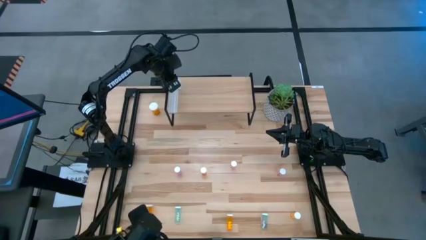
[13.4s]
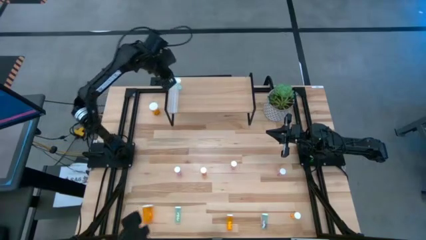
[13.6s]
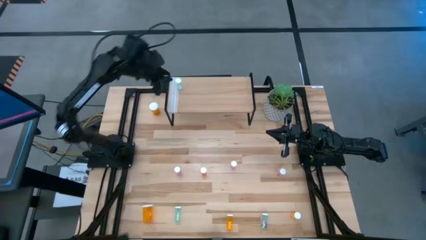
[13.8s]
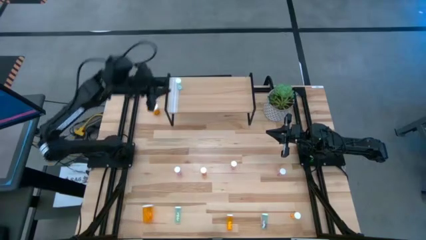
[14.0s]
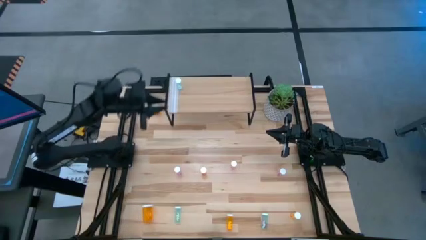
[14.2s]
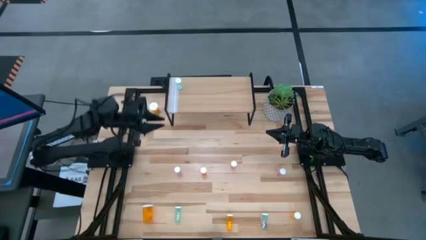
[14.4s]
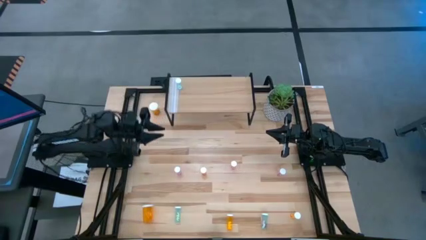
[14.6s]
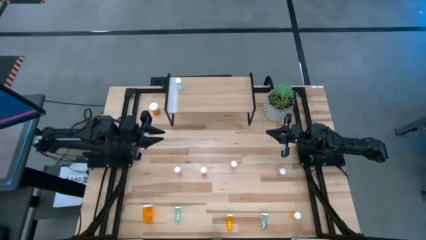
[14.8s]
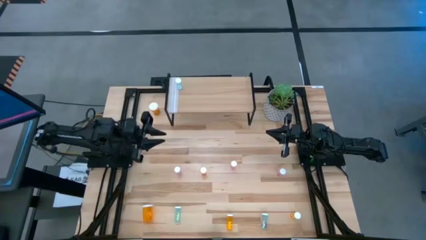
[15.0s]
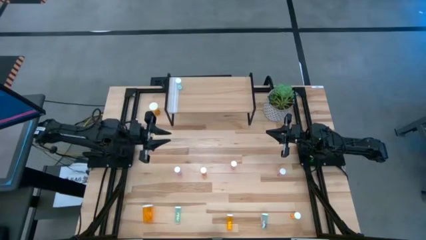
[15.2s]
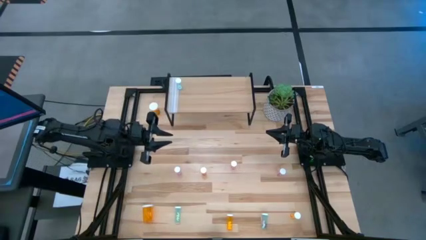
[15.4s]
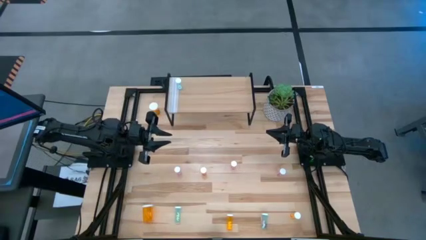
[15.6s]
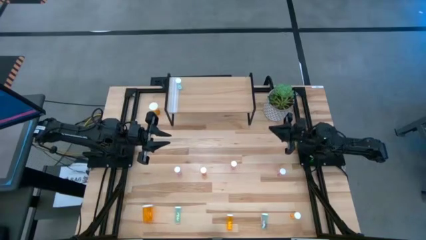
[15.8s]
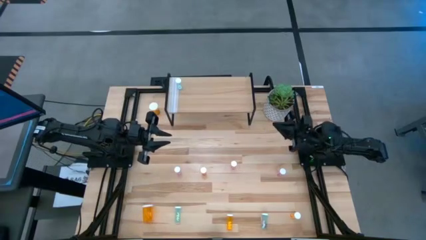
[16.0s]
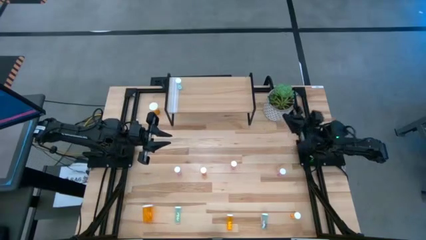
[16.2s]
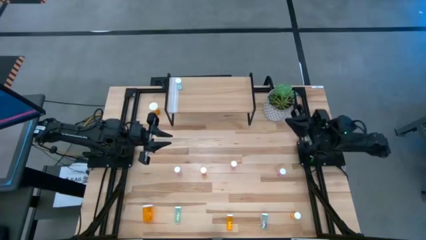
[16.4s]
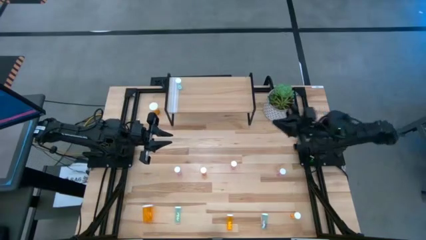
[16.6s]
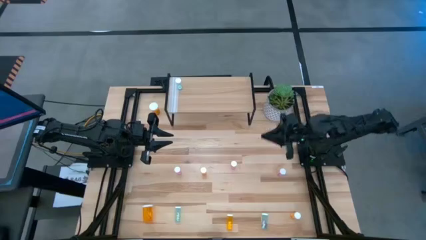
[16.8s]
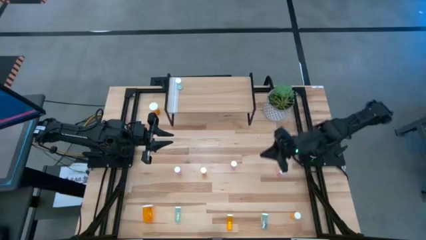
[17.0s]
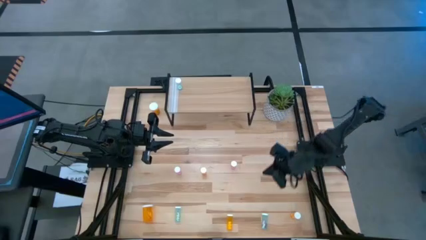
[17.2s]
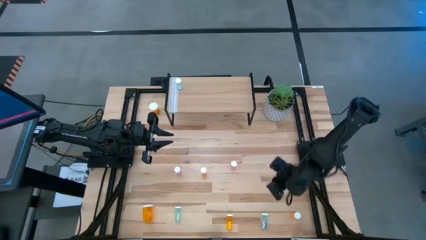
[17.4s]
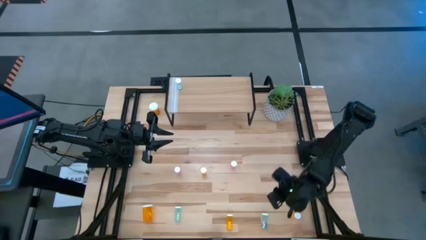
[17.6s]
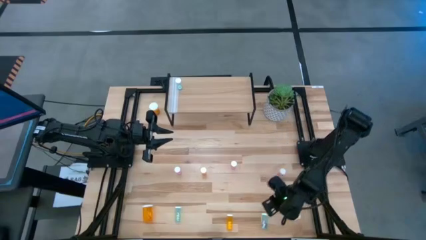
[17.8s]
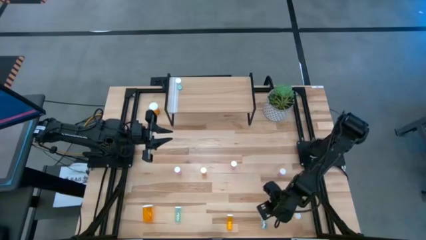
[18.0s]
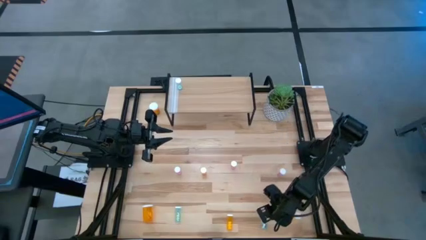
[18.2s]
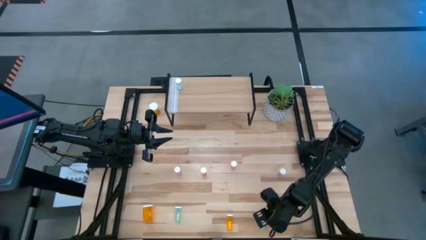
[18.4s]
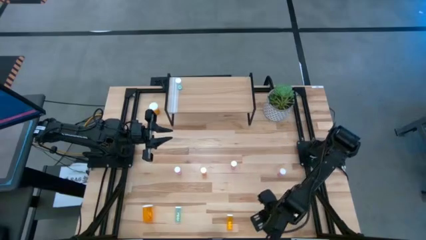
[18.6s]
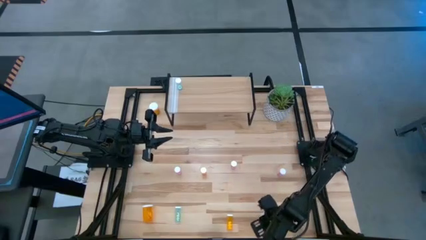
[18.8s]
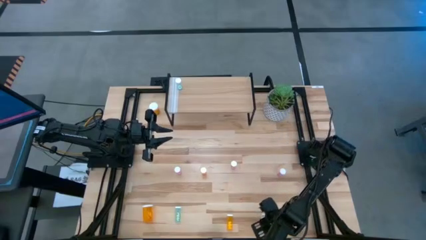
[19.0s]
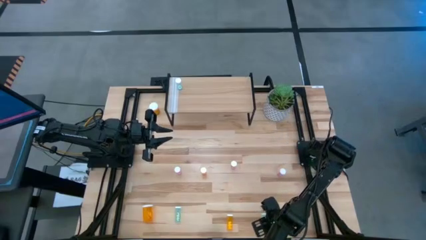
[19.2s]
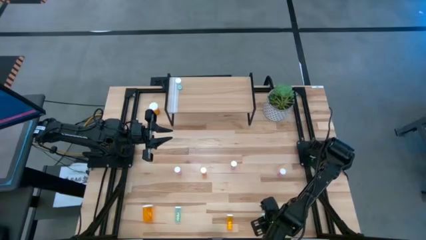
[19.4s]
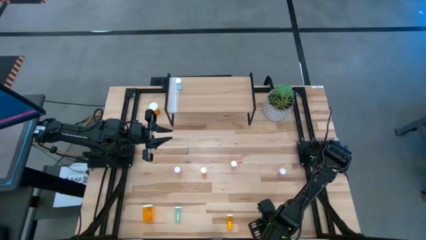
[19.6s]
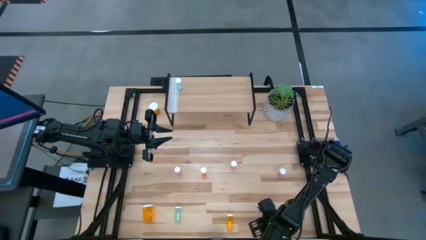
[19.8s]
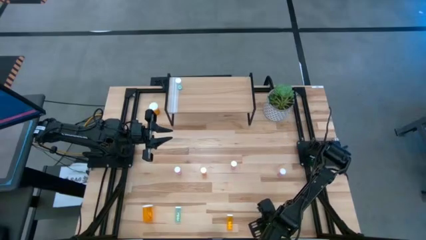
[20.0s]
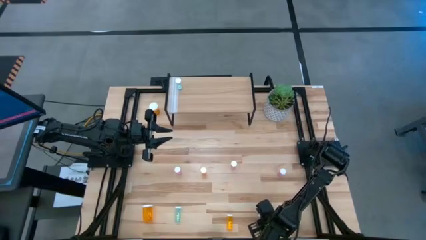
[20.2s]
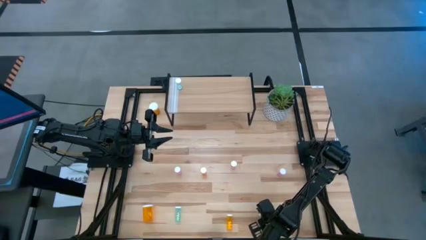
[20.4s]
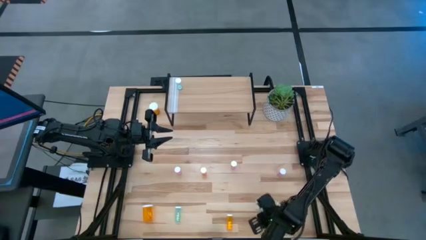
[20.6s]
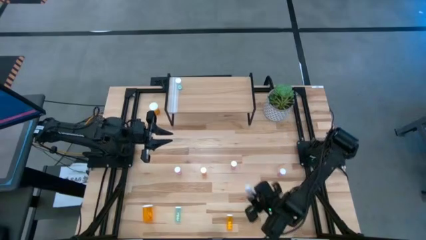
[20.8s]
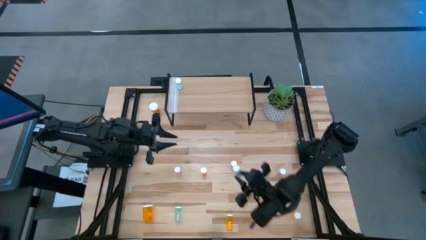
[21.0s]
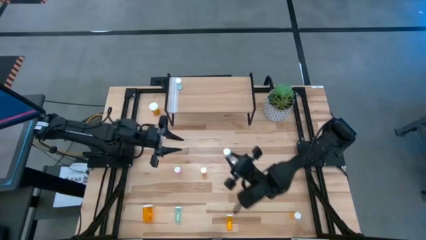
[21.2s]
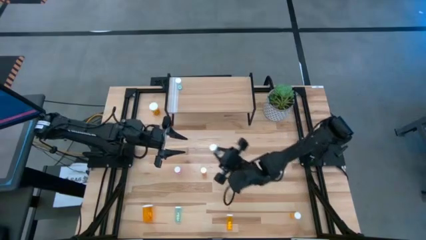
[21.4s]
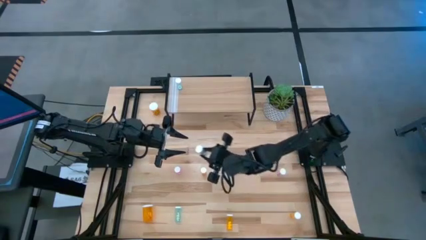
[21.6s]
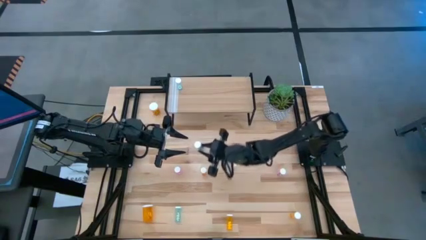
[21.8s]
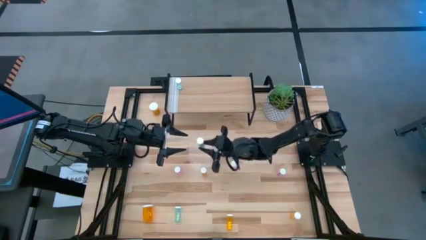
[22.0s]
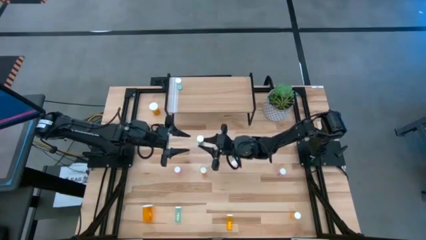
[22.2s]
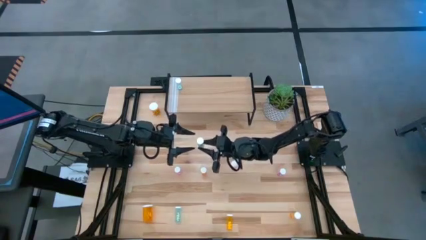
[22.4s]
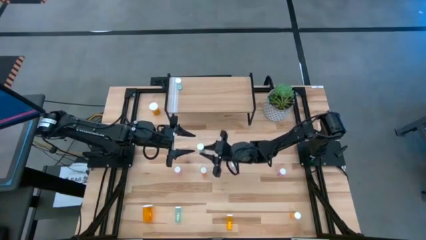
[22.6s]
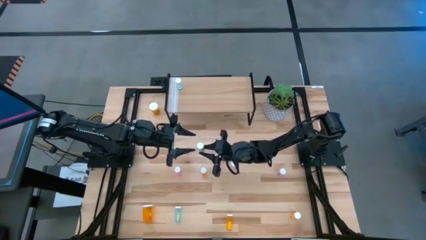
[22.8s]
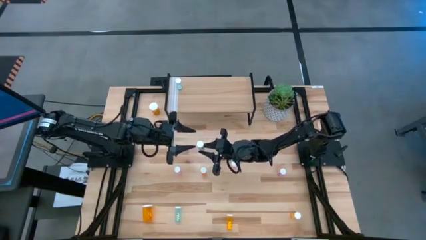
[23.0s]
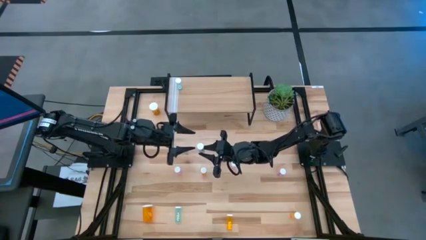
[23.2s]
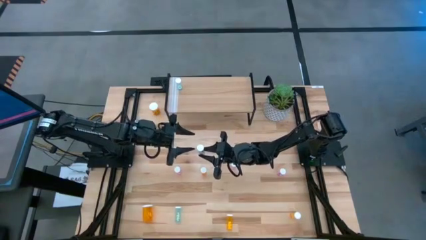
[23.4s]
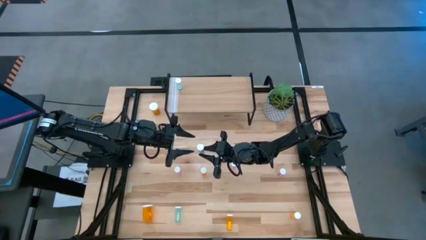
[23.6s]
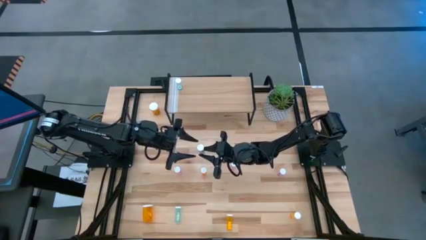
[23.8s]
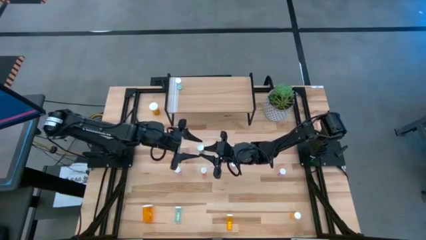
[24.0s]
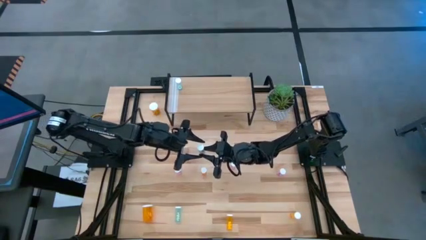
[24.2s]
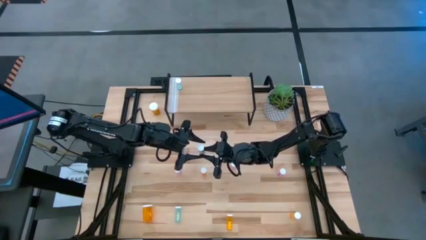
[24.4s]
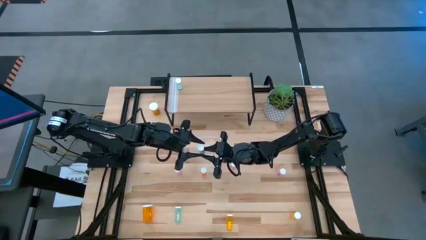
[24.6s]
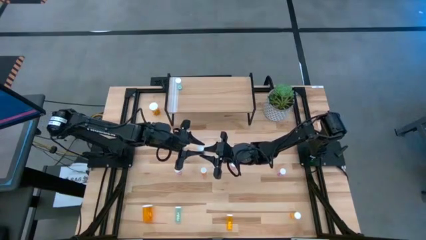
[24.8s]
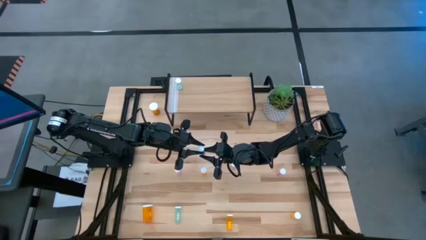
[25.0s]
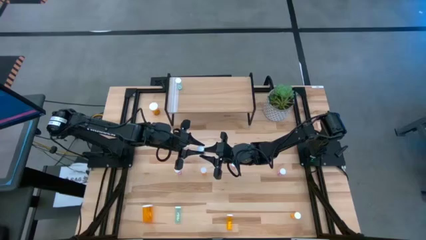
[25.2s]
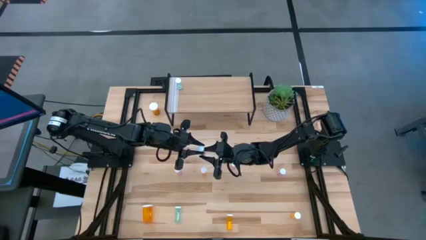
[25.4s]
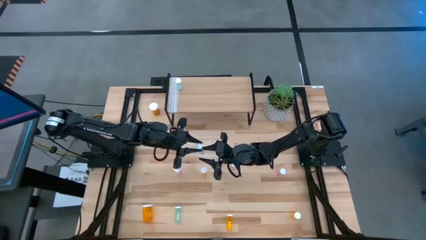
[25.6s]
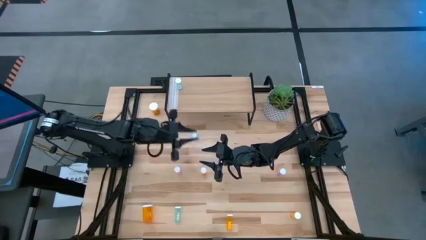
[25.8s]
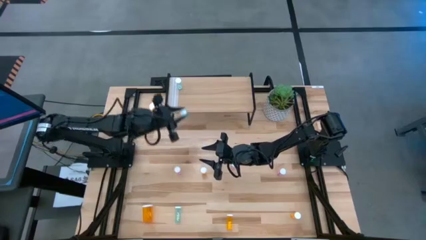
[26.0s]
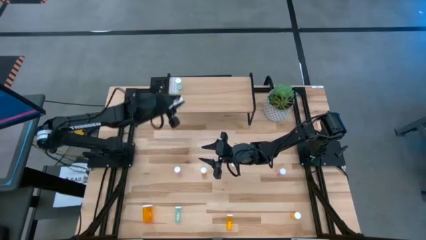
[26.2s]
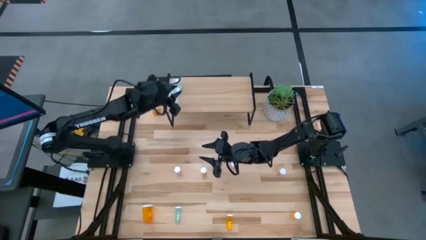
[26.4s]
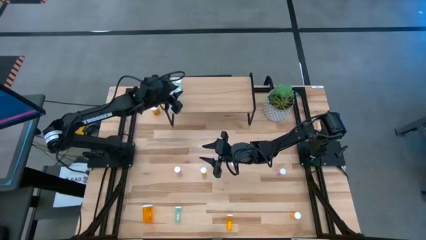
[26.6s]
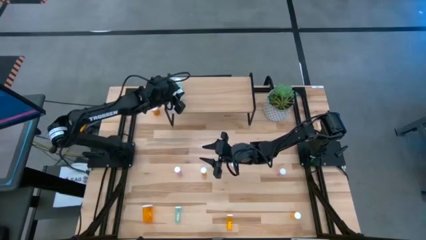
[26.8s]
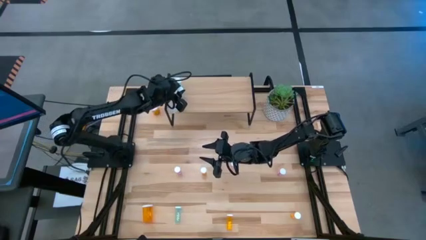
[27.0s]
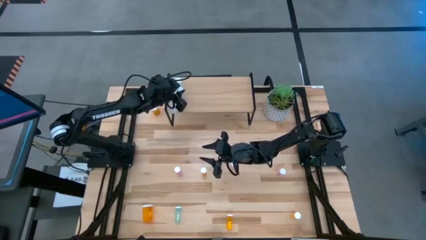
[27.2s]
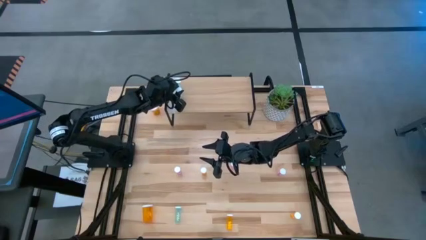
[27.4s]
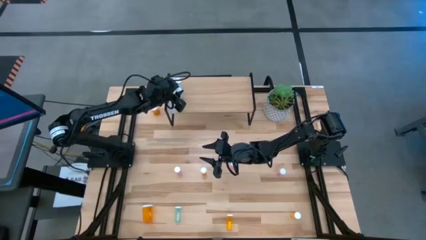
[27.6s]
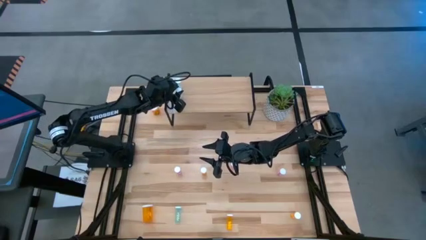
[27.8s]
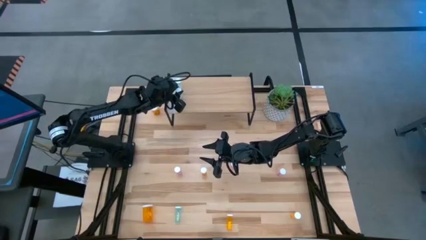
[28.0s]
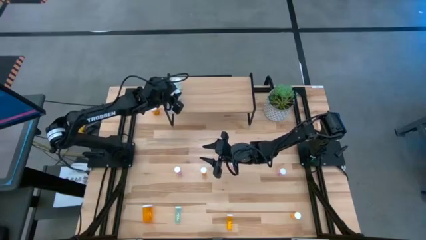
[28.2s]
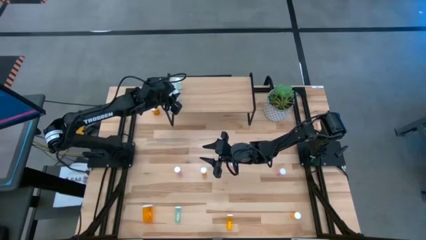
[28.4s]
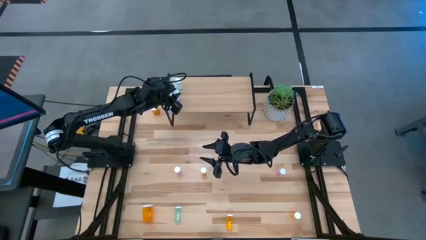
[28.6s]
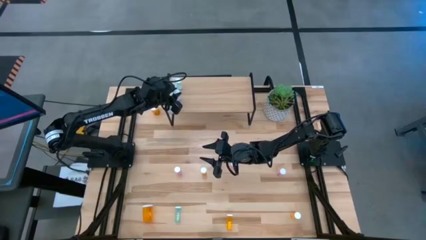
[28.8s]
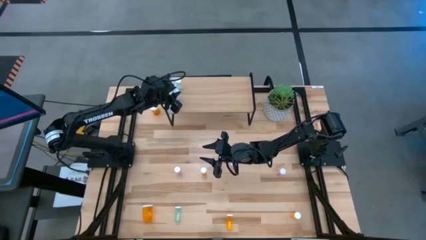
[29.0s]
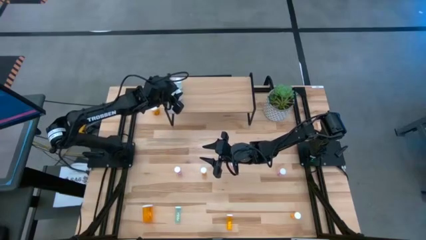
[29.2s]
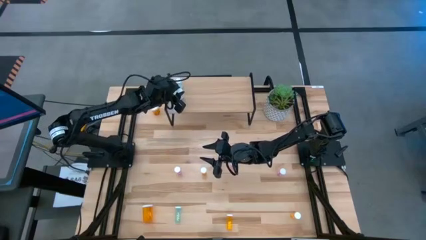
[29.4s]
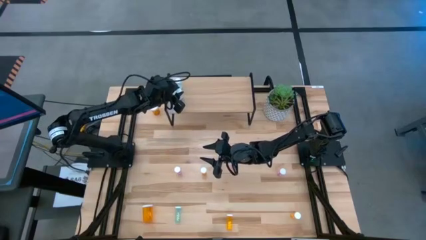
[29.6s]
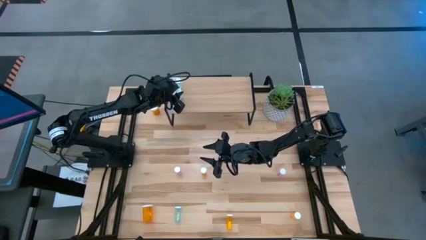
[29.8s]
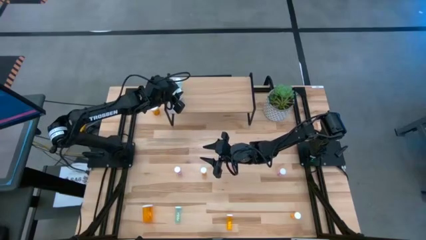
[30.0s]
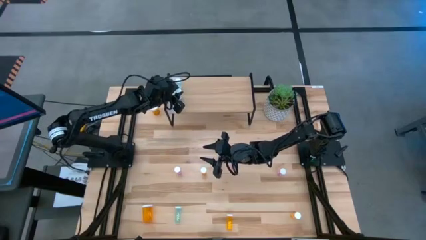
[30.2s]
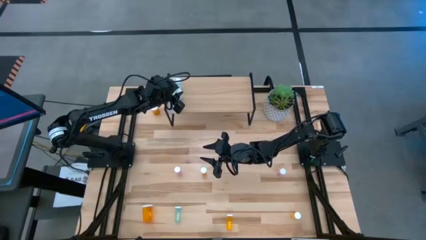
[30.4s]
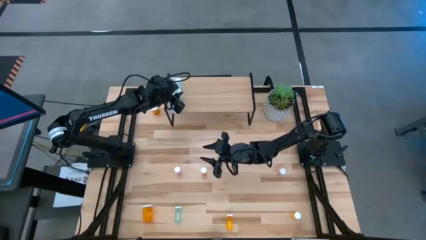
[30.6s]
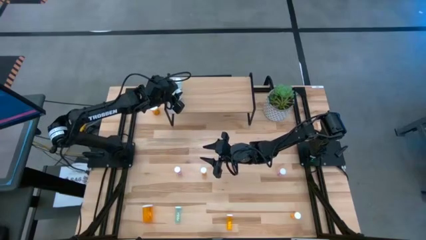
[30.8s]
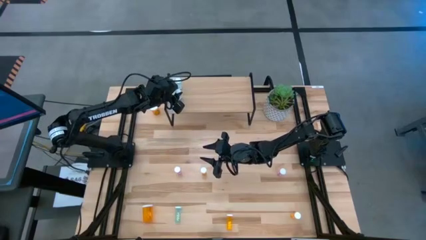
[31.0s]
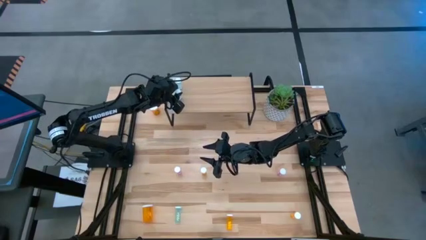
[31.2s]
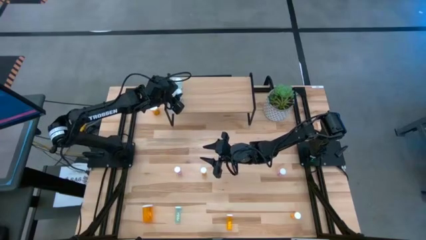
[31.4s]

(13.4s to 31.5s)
Task: Pick and place medicine bottles onto shelf by color
Put the right blue pill bottle on the shelf aligned with the other blue pill bottle
